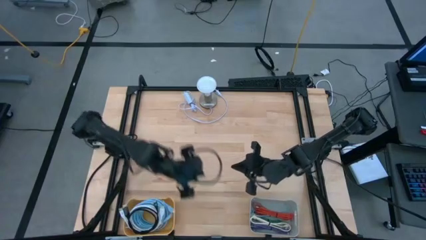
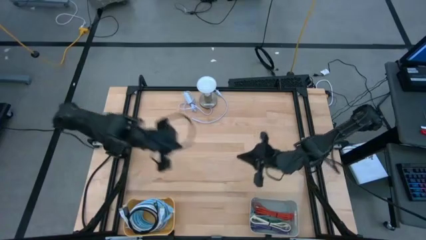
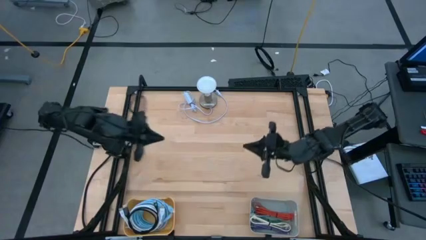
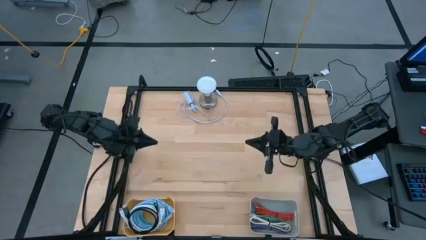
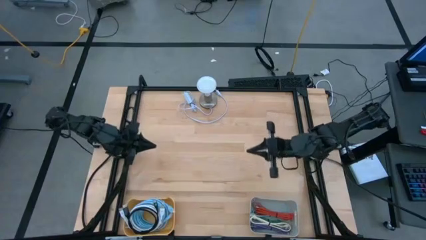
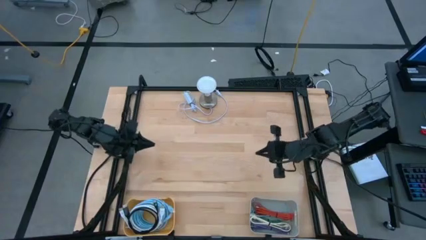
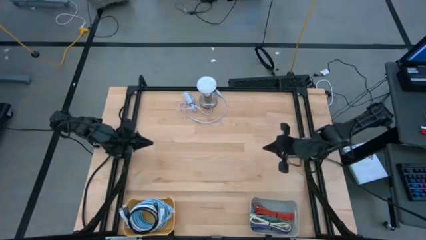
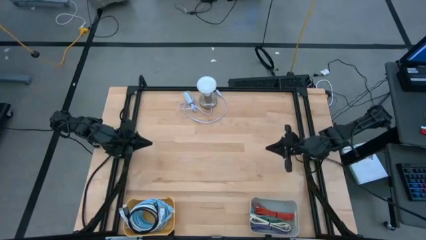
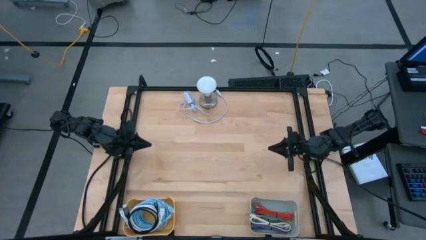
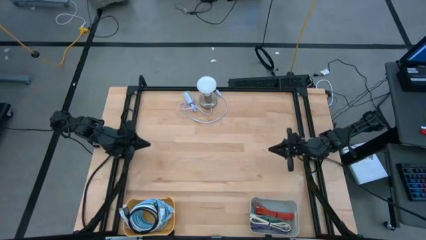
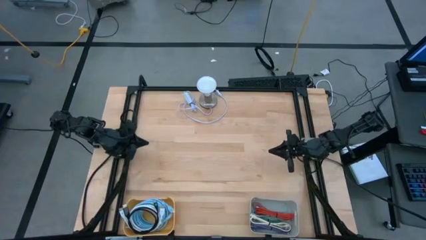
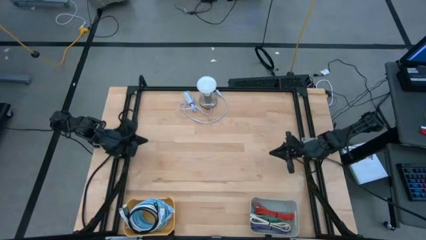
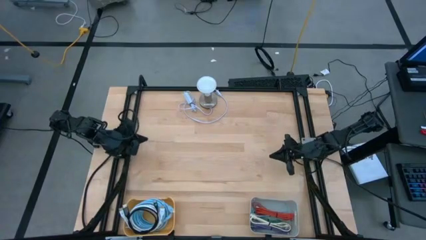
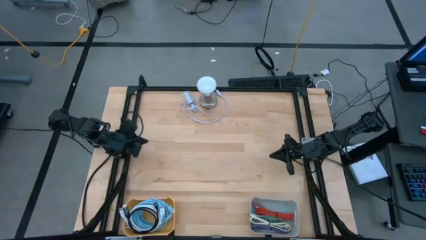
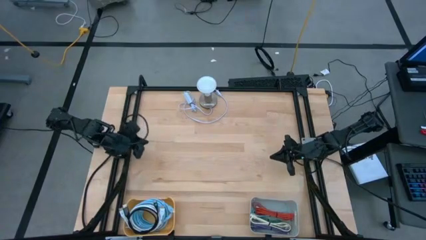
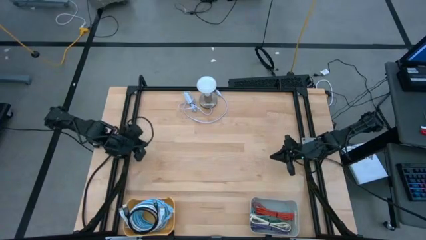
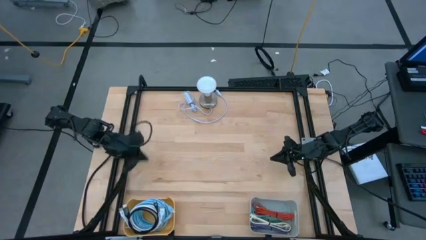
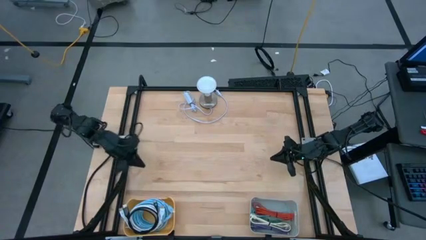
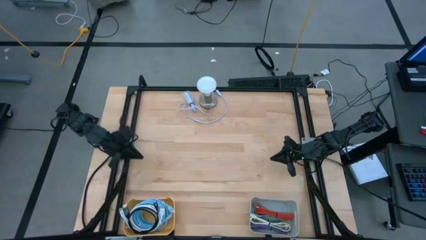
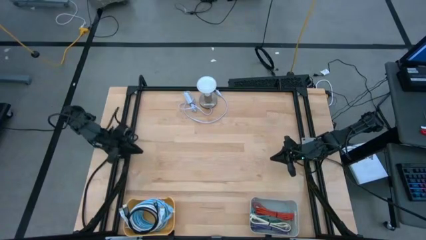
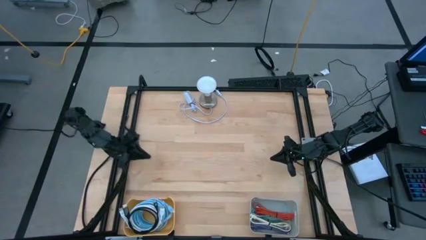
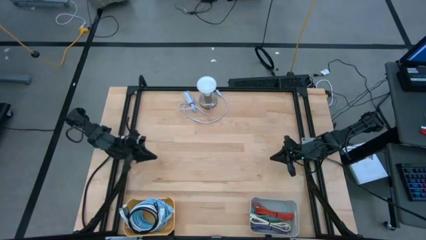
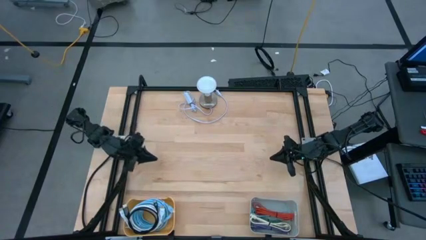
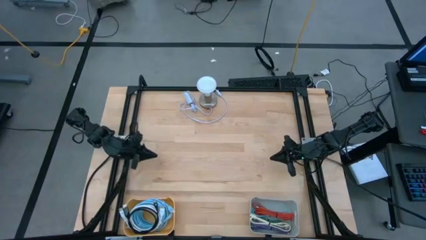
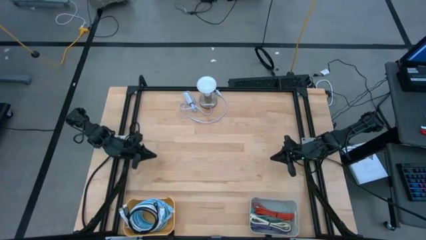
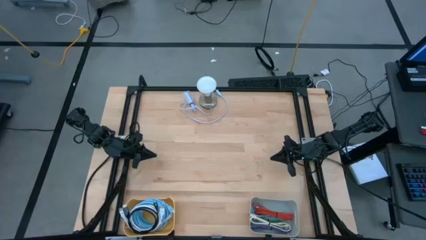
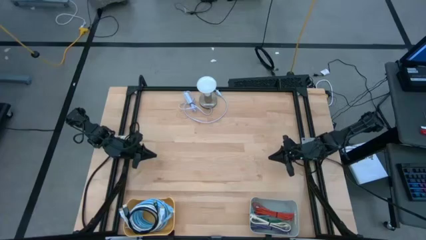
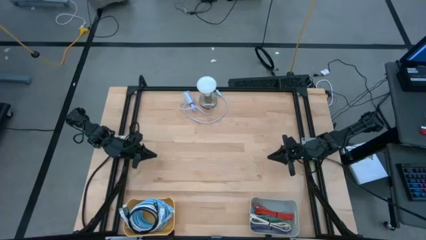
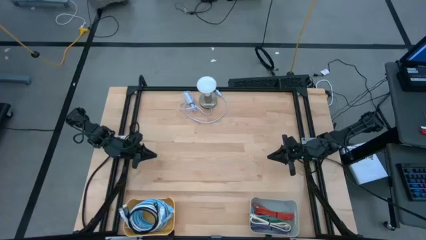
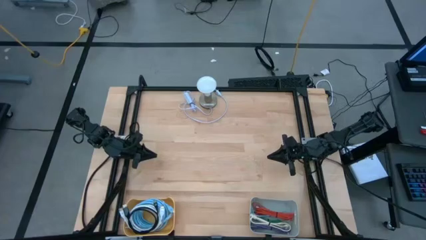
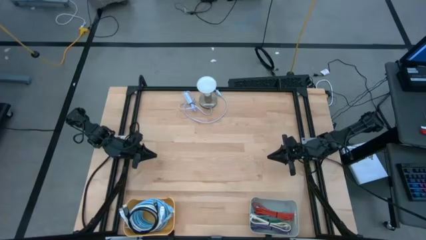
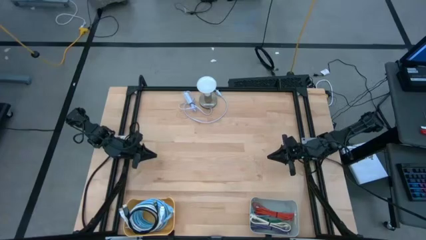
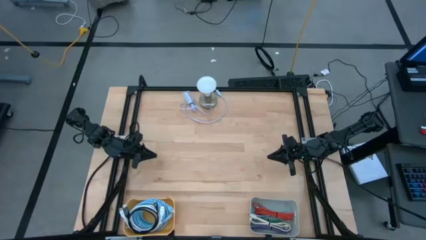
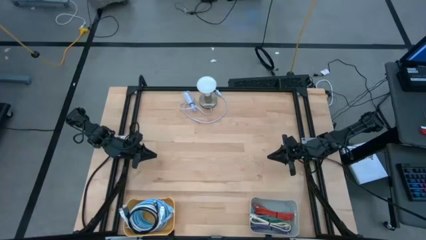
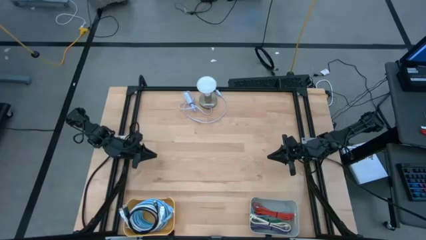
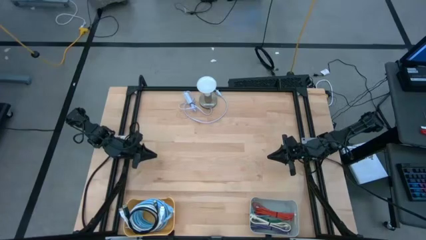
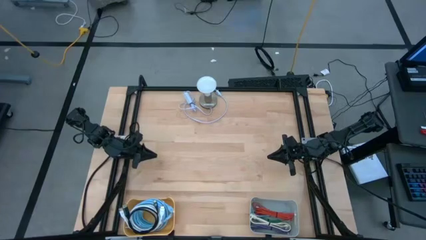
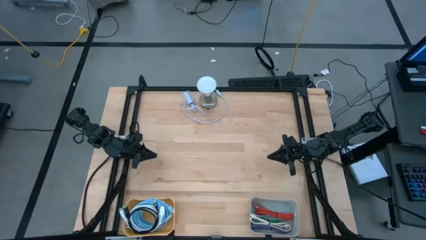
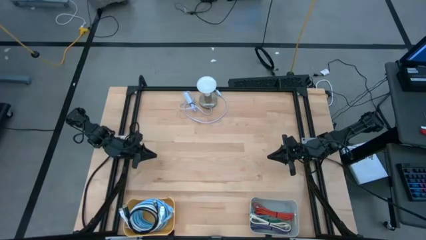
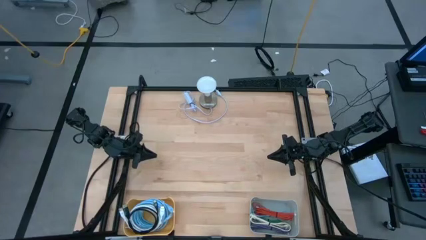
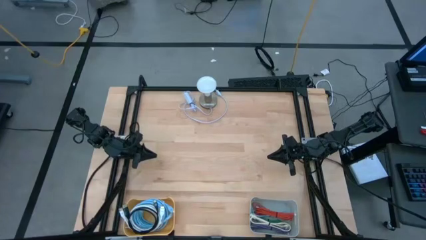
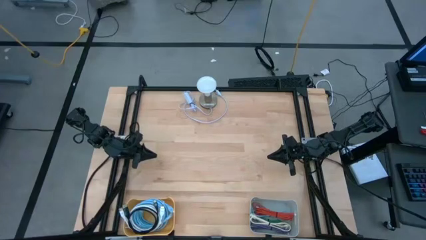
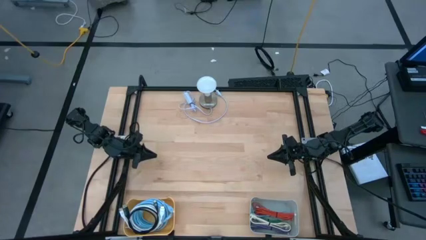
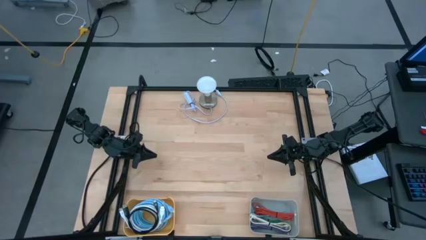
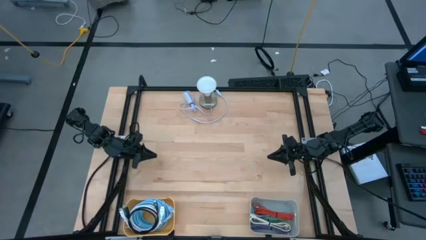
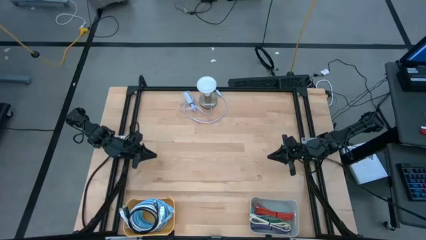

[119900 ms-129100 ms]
Task: Pick & Place USB Port
Return to Home Position

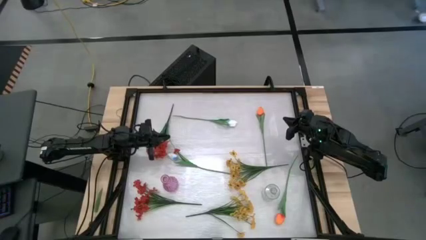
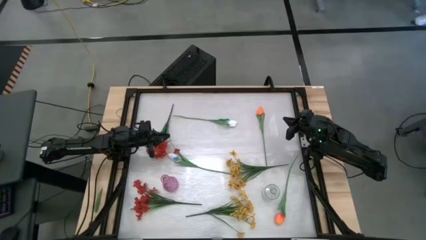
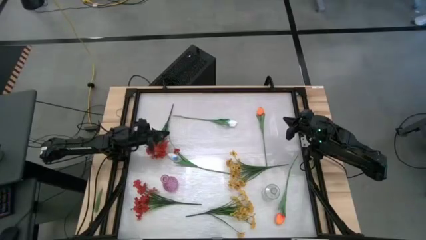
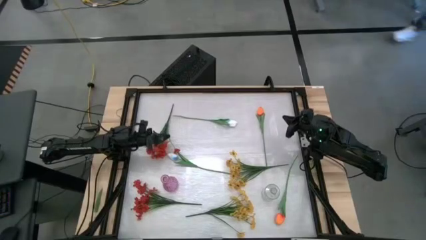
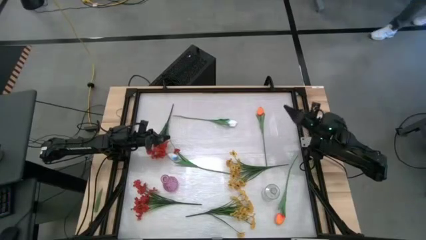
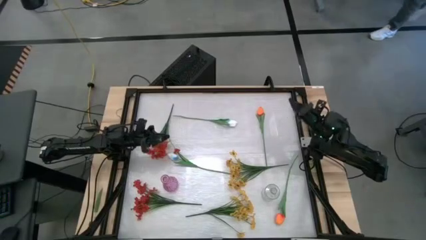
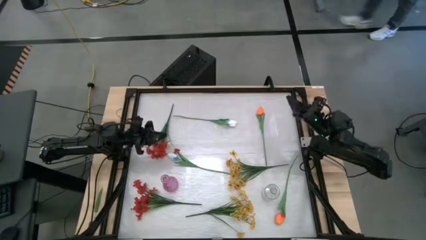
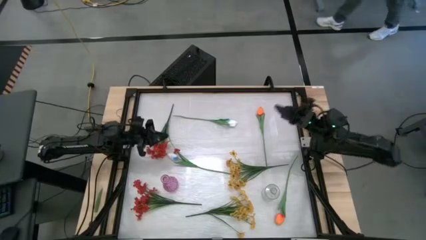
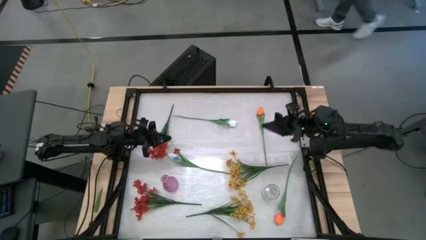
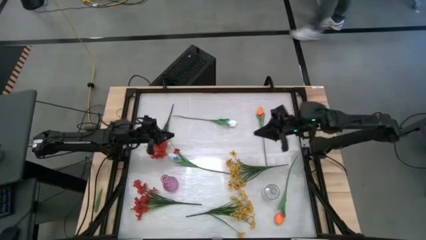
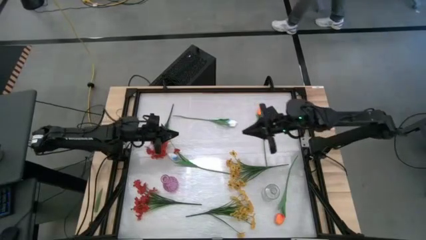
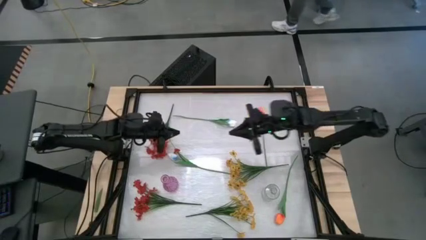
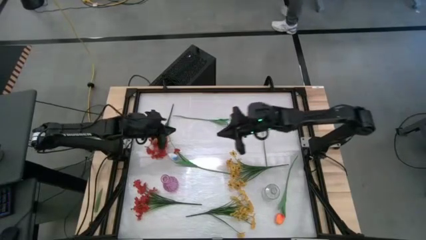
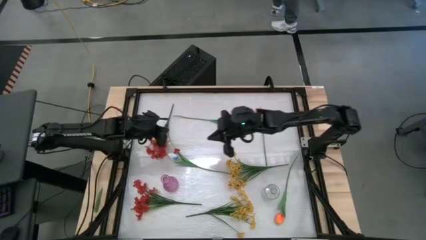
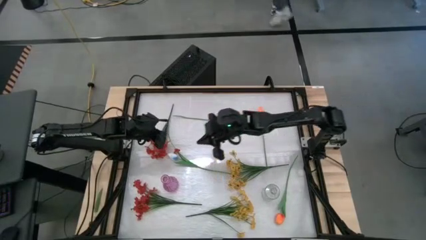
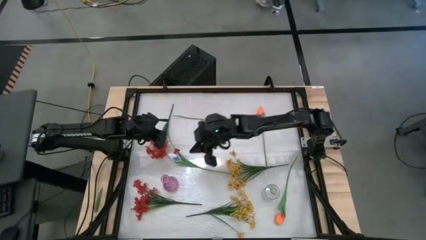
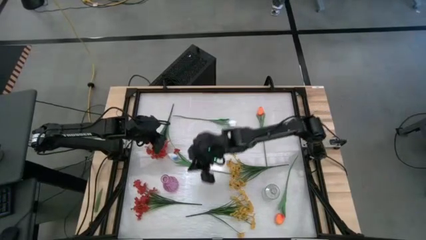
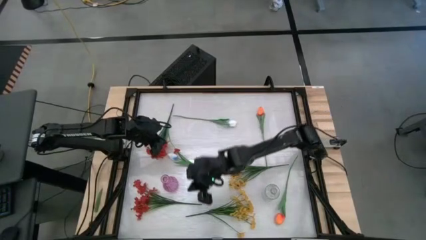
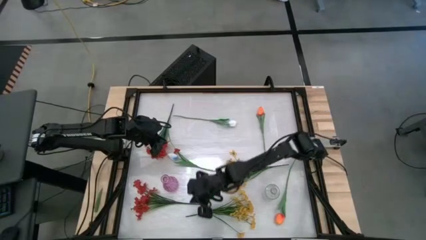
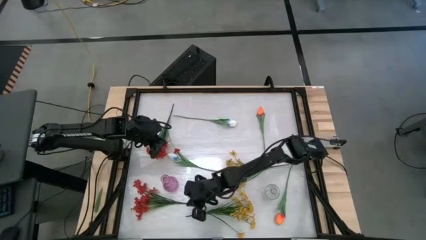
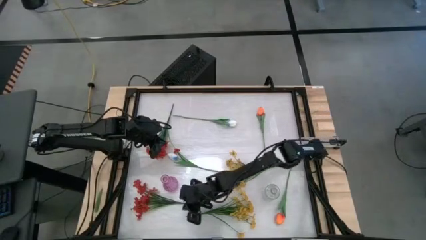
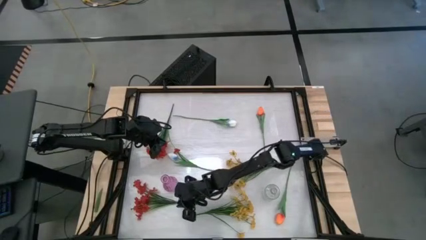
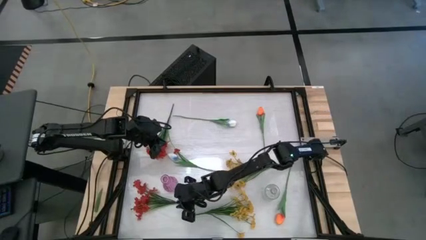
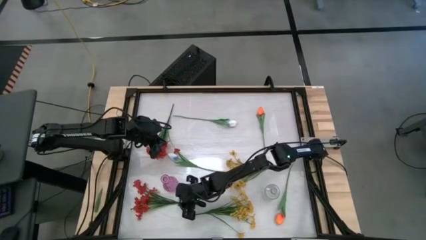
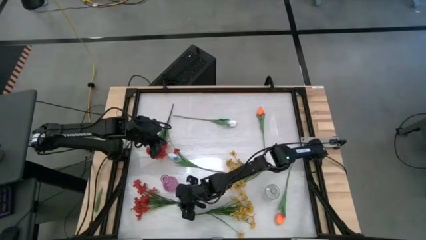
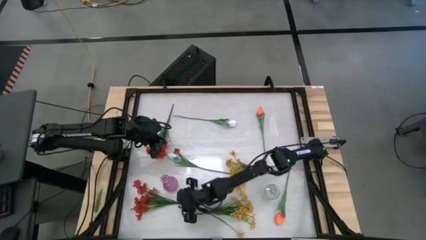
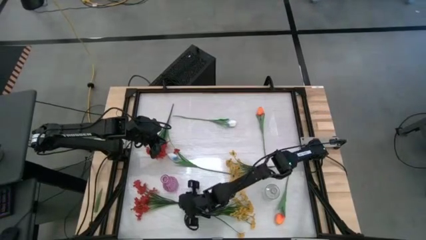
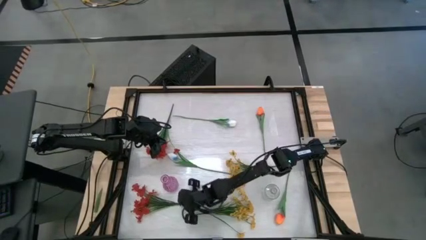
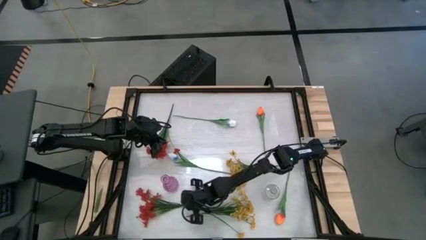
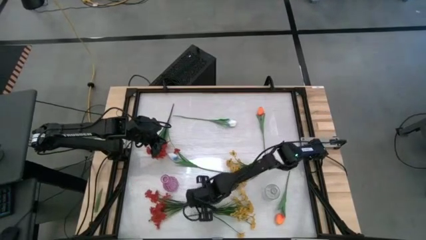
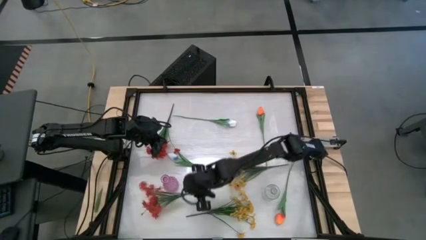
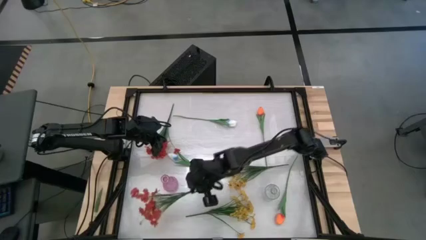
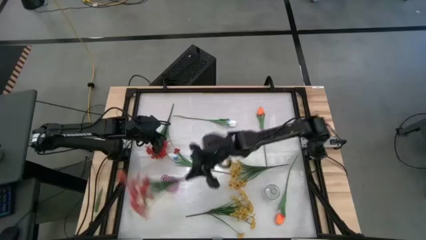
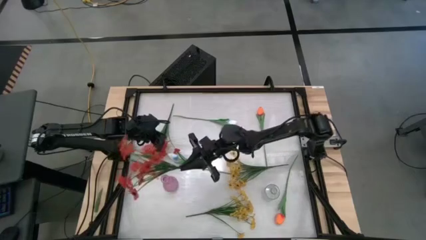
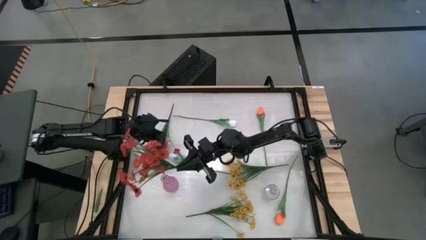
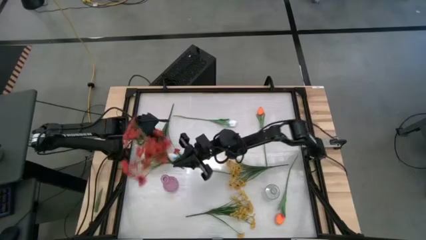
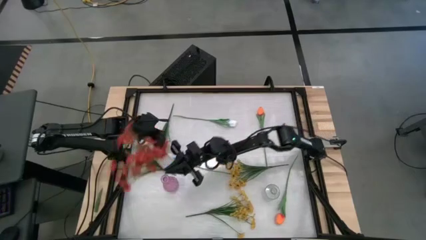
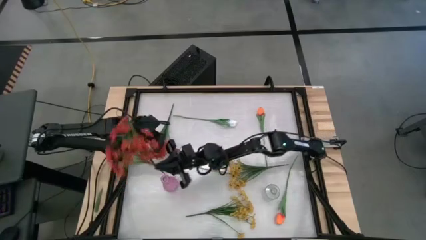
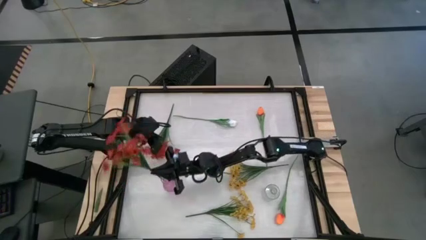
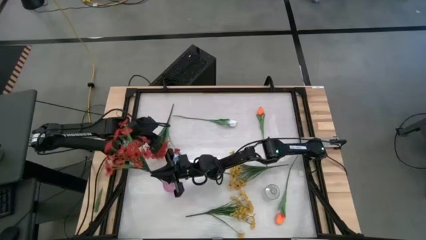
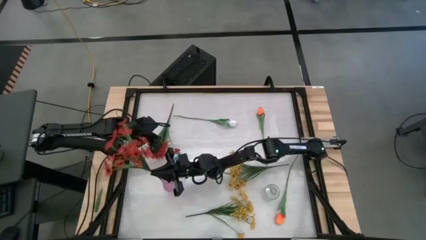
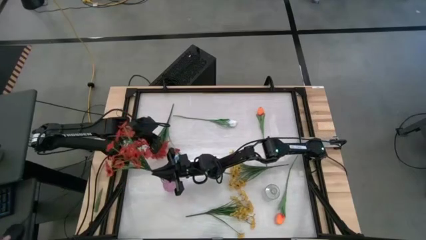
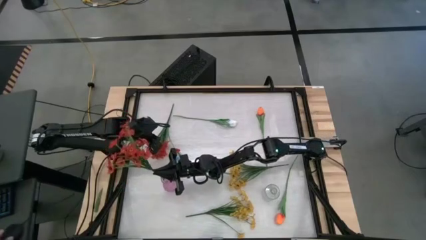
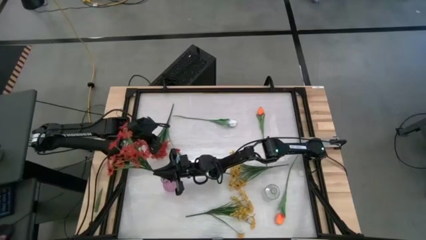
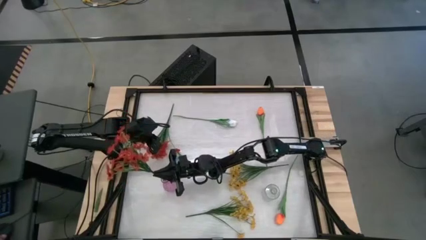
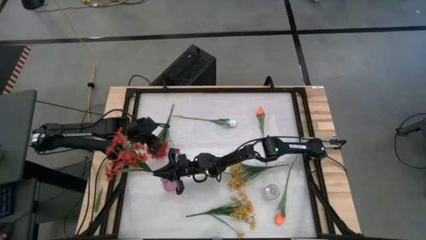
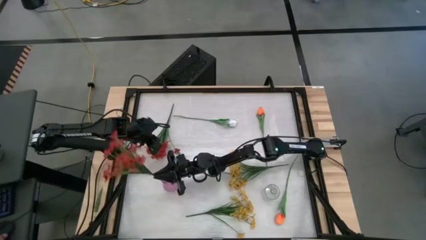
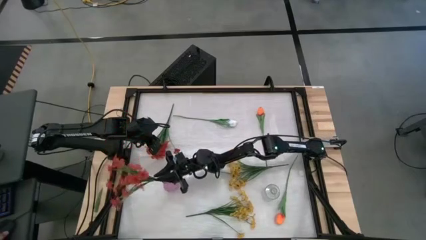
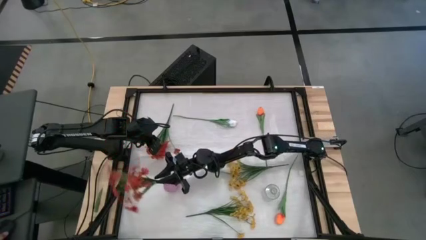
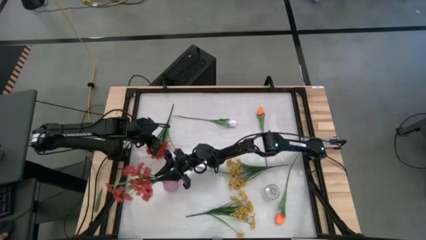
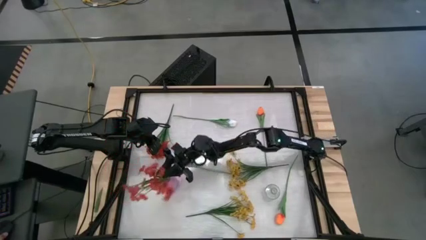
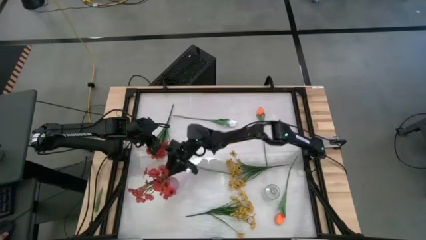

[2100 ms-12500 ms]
Task: Sort flowers into vase by color
Put the bottom red flowers into the purple vase
